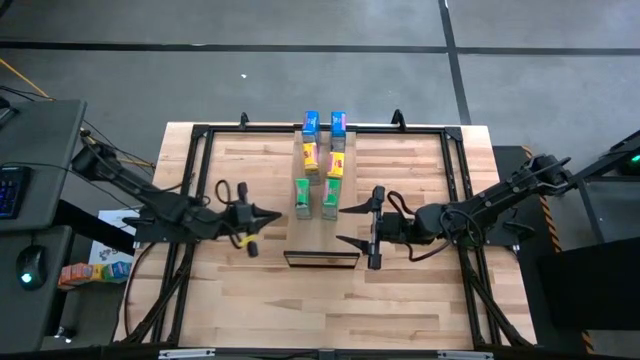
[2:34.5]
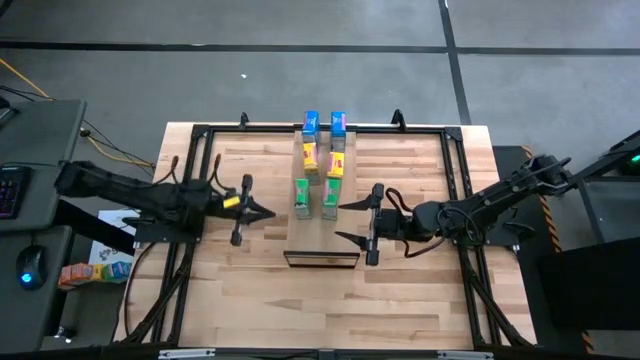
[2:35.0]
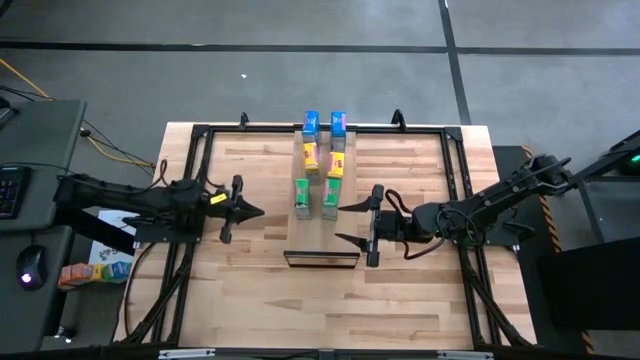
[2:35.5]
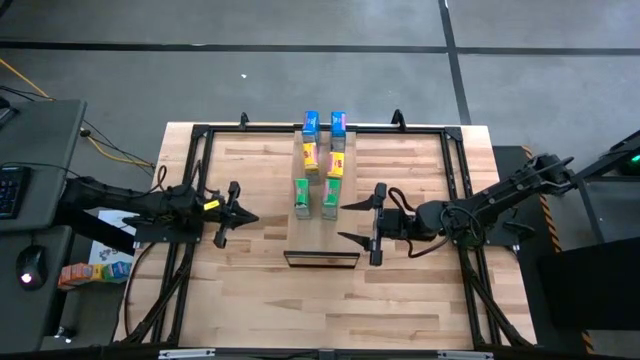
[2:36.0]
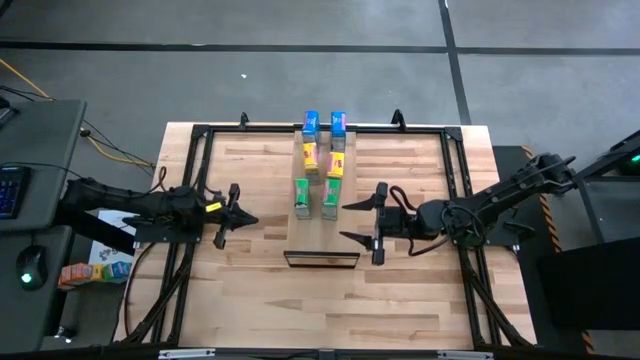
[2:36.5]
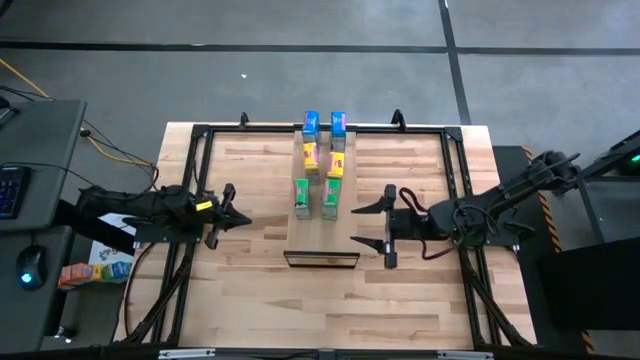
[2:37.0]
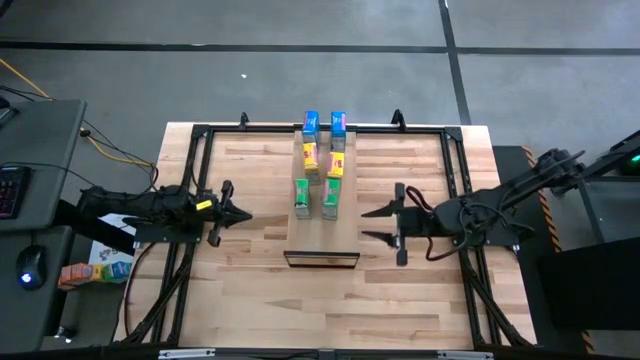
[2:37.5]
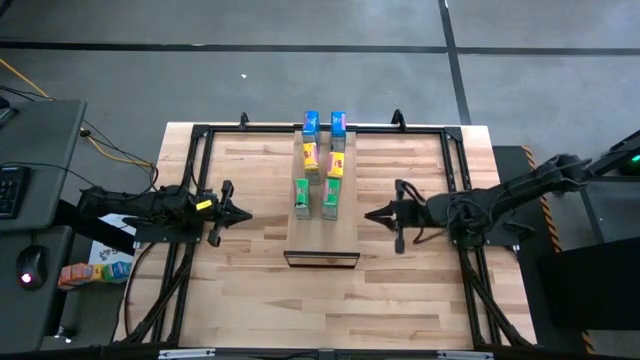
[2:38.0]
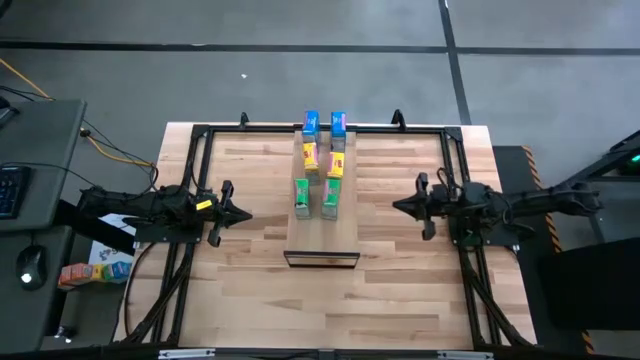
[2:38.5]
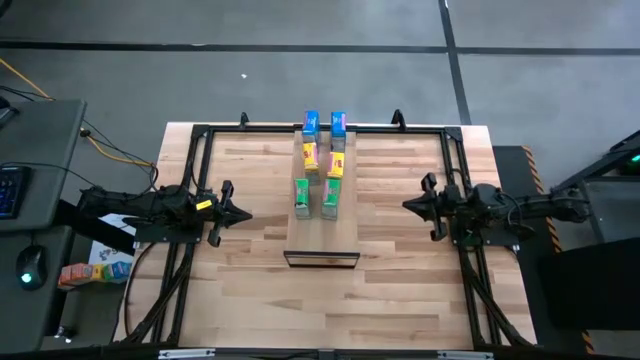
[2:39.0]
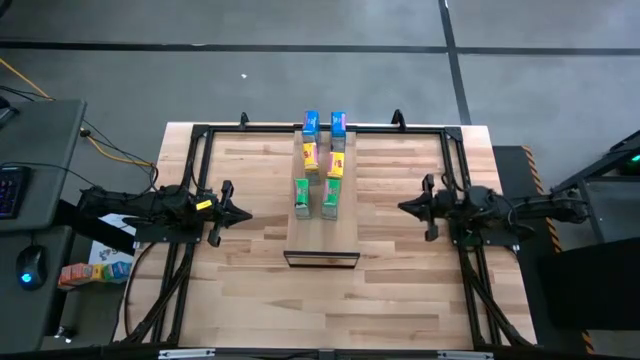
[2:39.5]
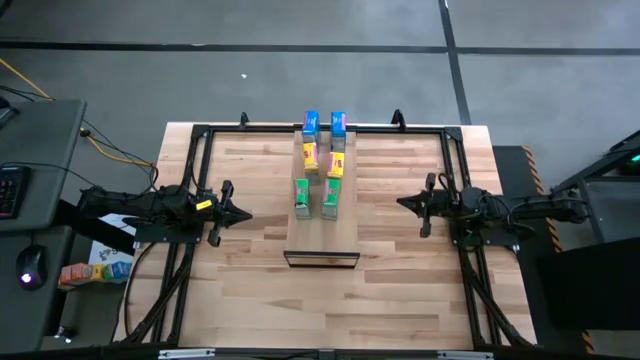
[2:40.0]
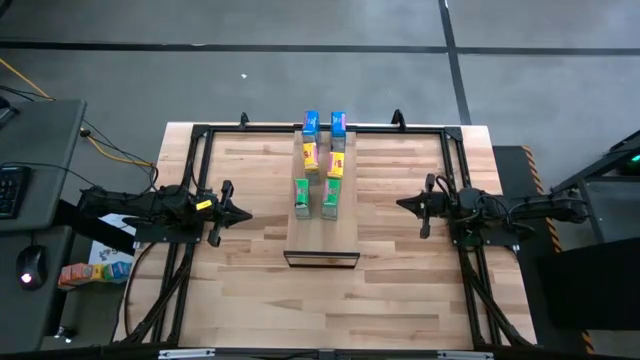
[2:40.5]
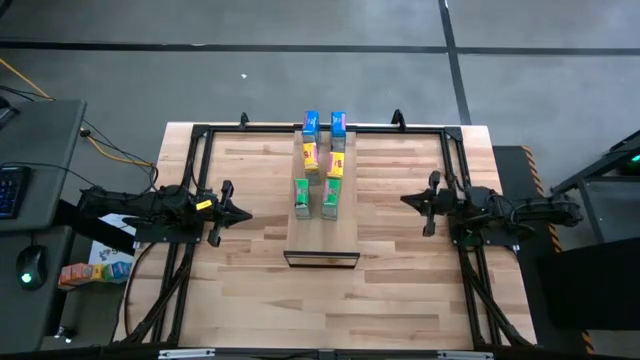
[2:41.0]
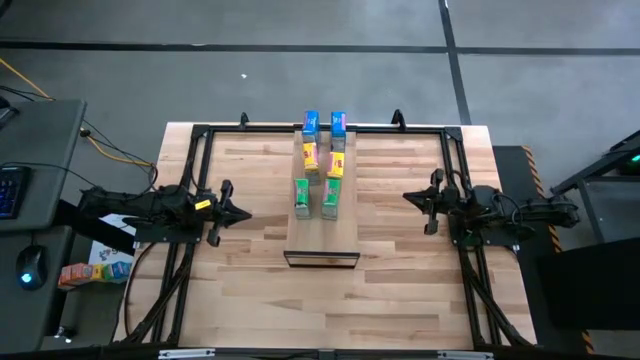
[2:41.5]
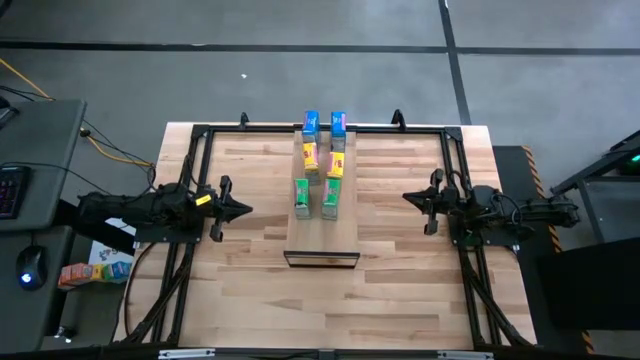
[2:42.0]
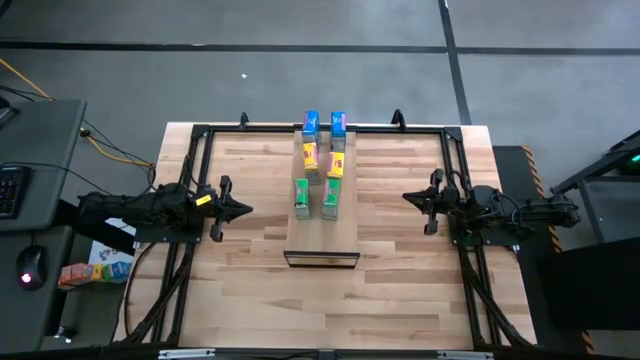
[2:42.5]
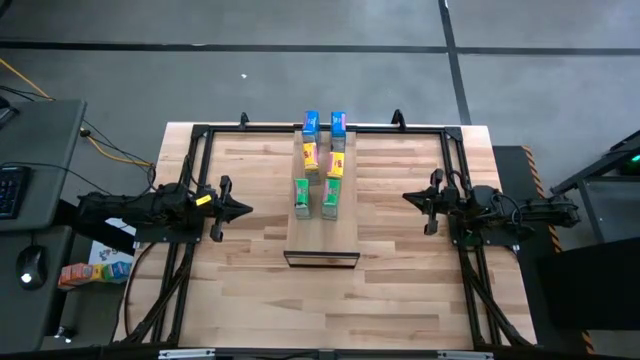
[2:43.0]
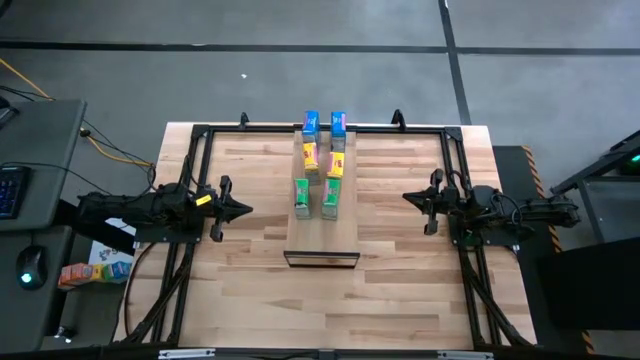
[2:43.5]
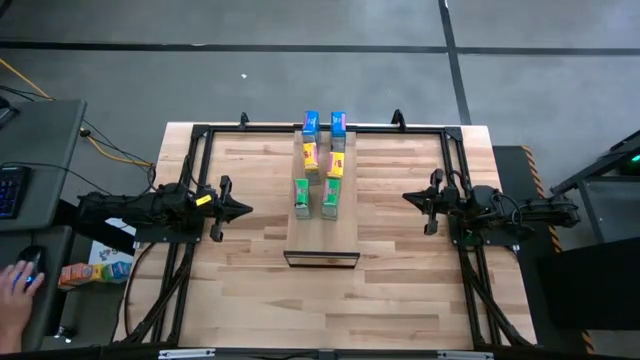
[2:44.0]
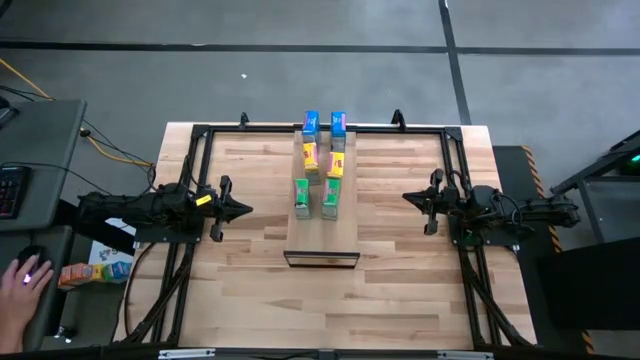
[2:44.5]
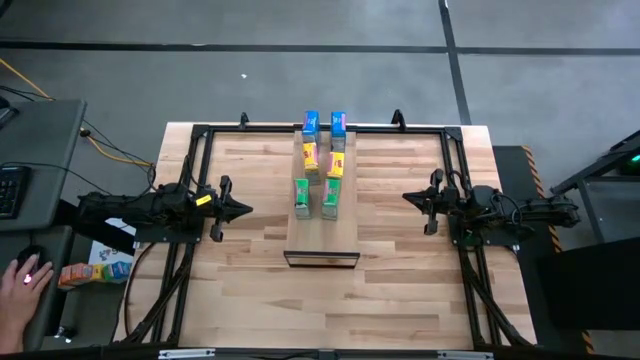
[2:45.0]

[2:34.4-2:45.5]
Task: Stack cereal on shelf
Return to Home Position

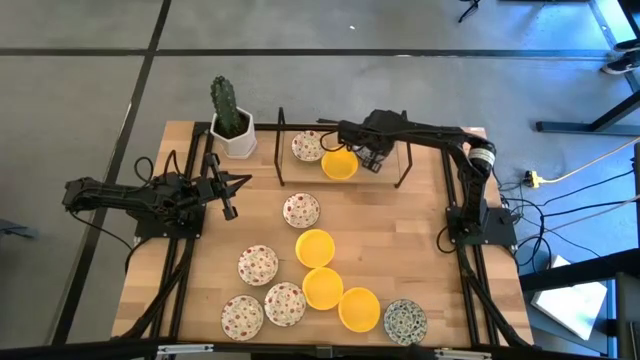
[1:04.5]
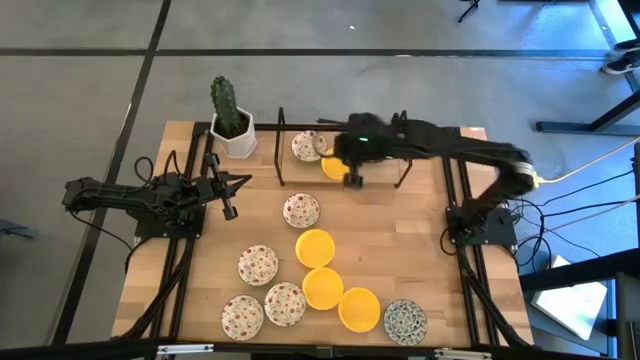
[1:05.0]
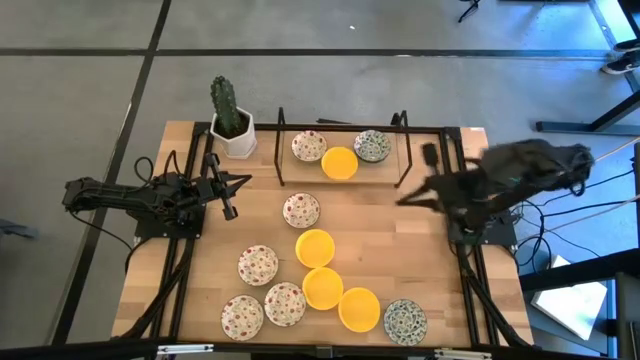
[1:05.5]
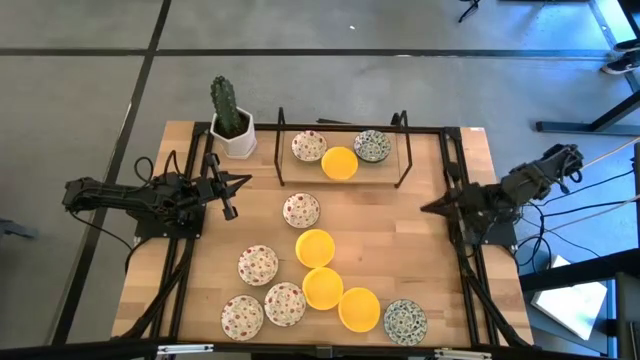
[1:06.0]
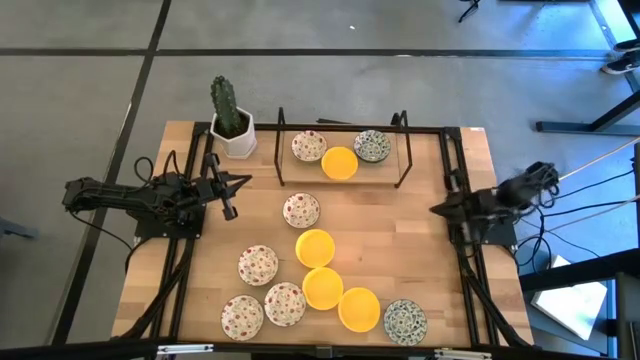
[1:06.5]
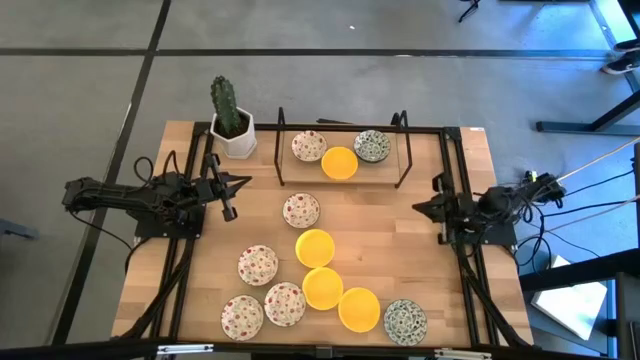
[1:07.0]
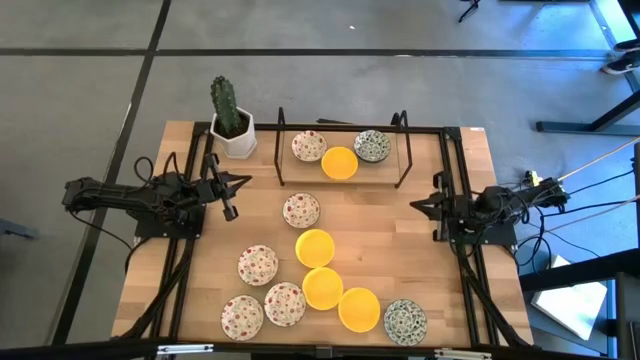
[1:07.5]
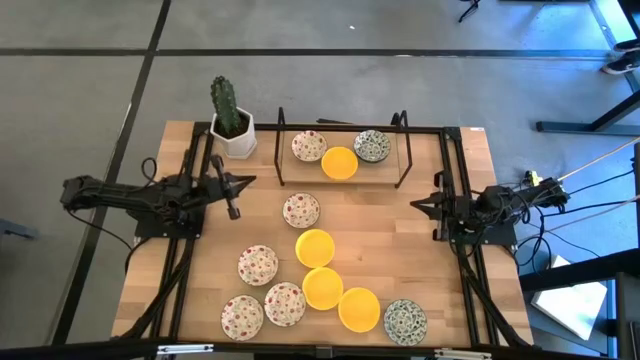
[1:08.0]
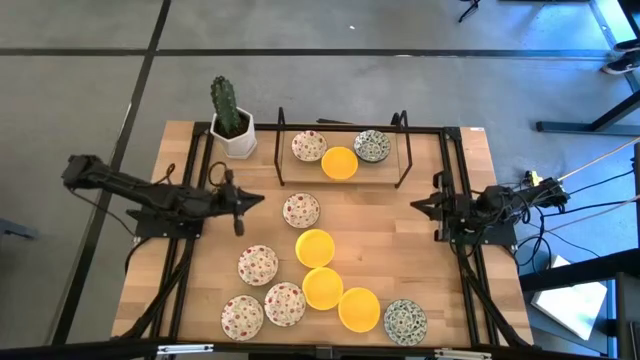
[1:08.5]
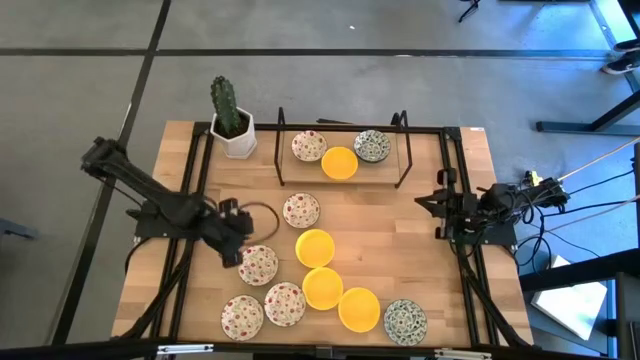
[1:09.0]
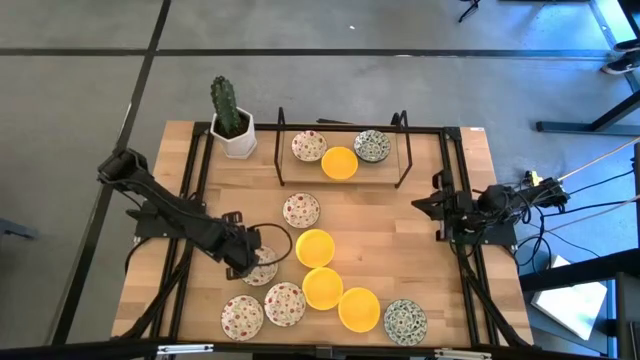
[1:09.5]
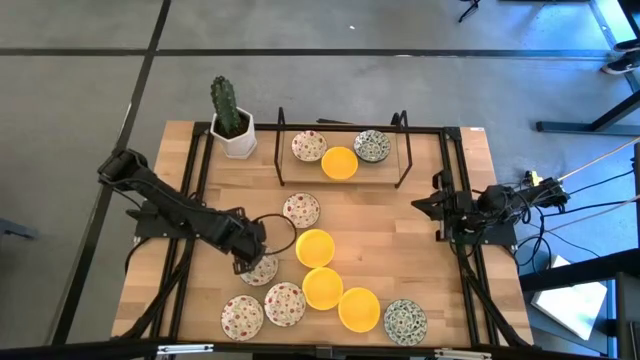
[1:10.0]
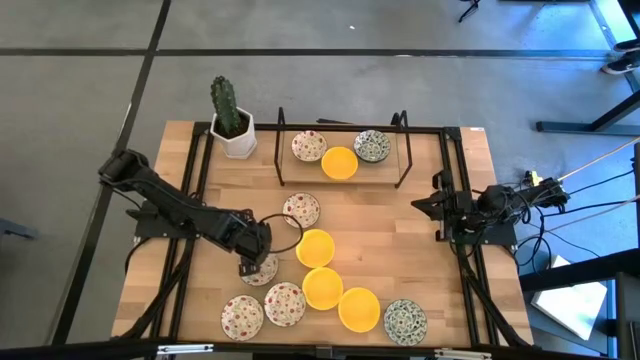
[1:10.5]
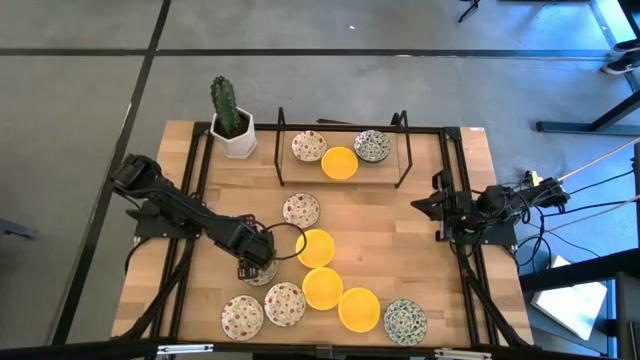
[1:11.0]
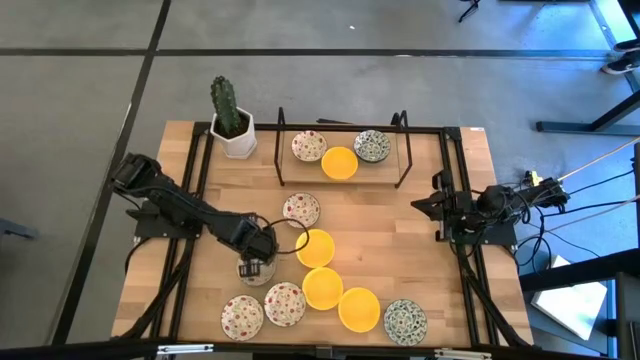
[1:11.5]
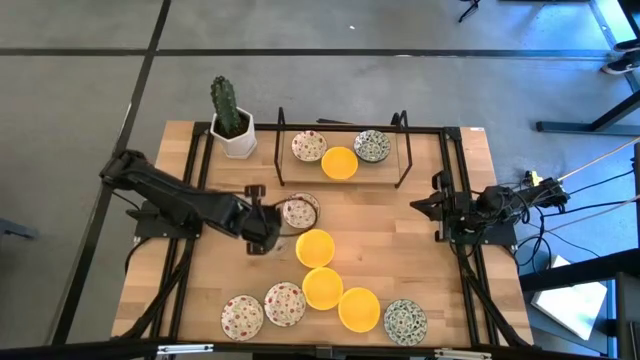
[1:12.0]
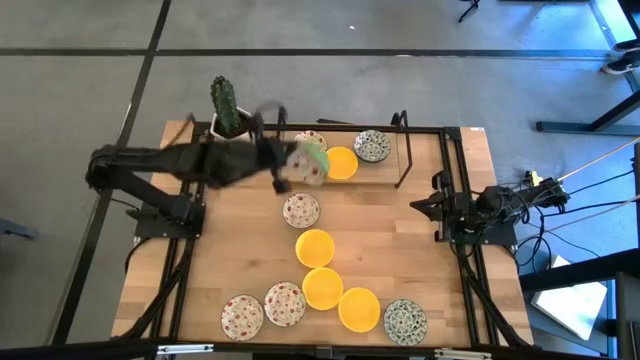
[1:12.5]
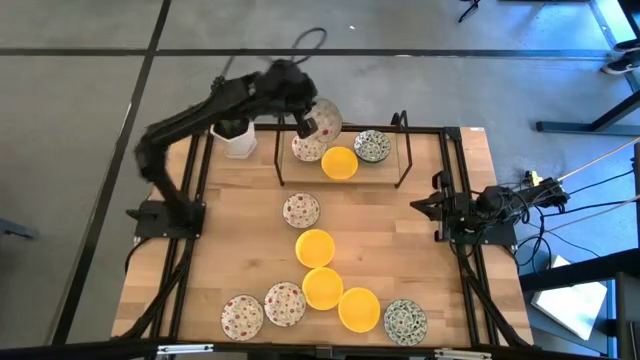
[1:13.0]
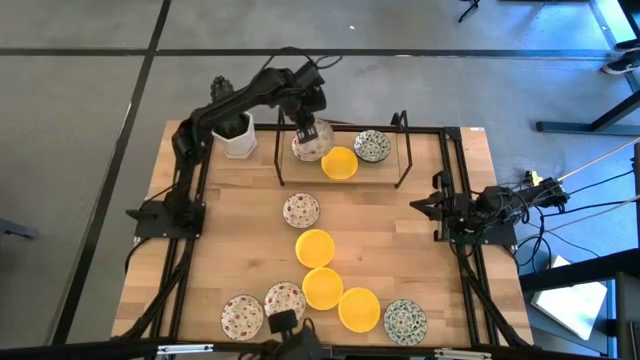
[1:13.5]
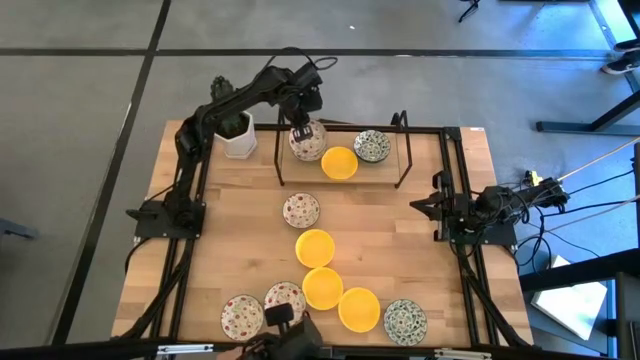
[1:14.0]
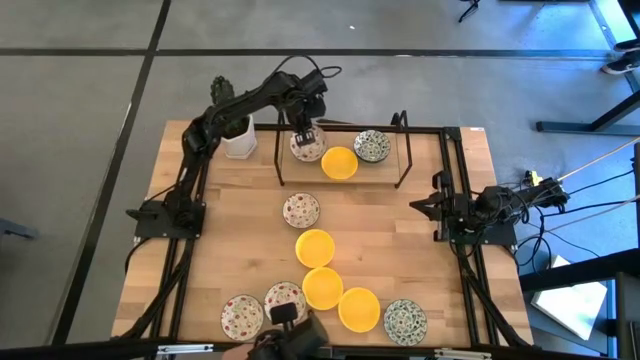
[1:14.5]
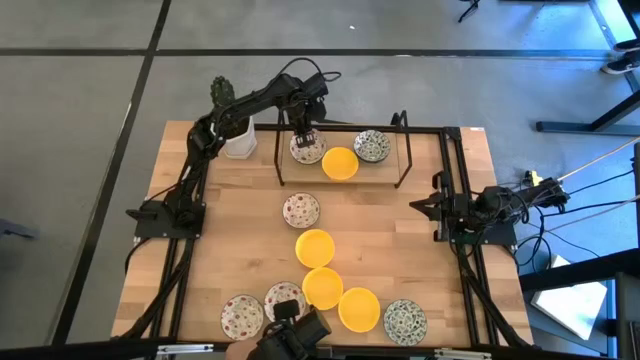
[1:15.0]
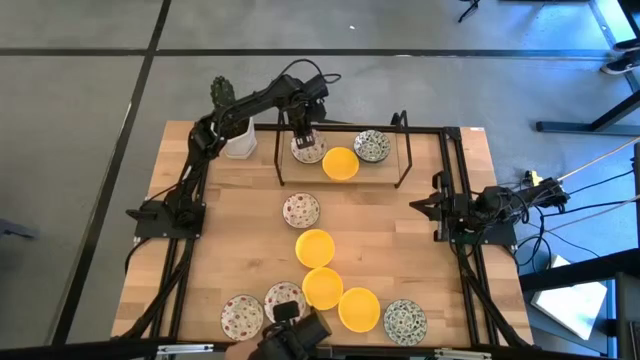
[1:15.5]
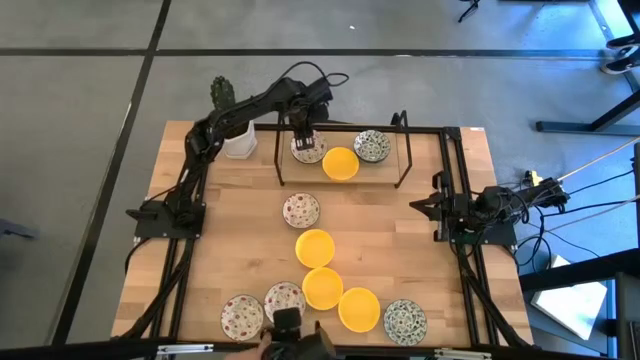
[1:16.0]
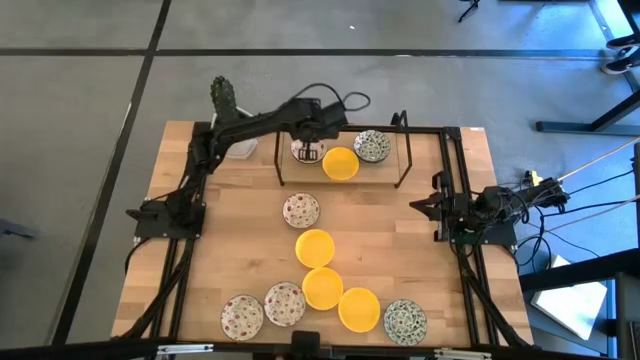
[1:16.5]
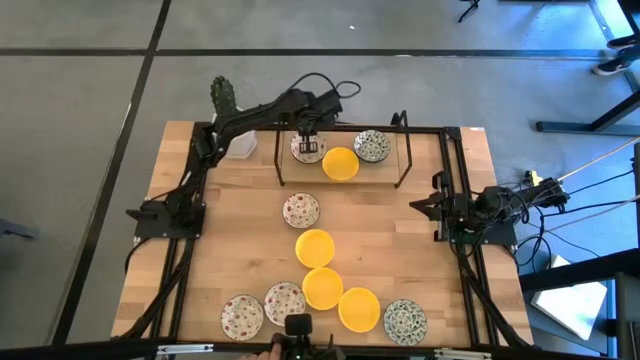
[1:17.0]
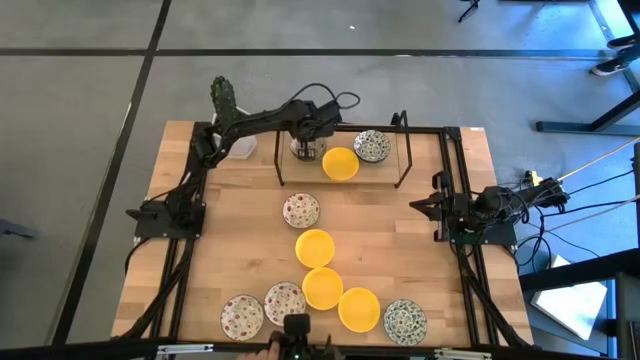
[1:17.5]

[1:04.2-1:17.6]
Task: Pick & Place Mini bowls
Stack the white red patterned bowl on top of the white red patterned bowl on the shelf
